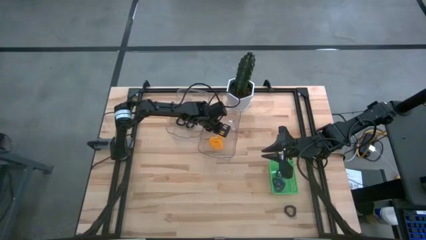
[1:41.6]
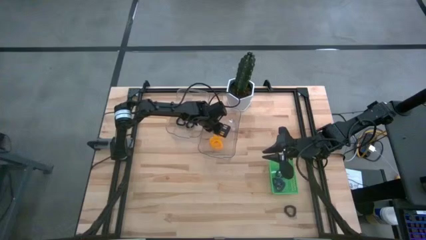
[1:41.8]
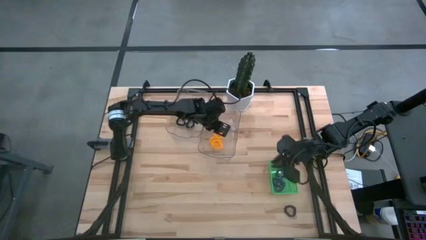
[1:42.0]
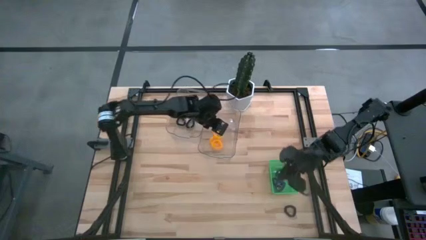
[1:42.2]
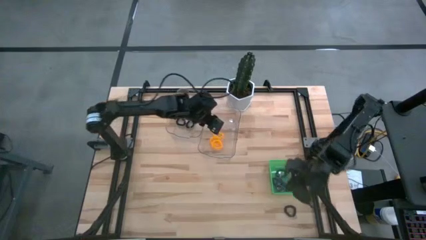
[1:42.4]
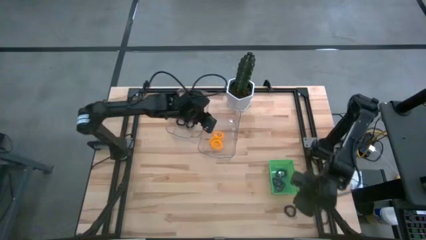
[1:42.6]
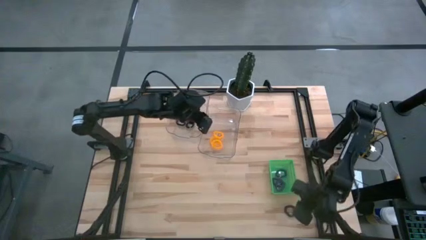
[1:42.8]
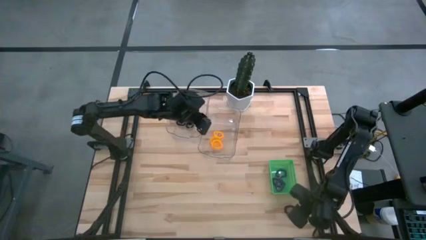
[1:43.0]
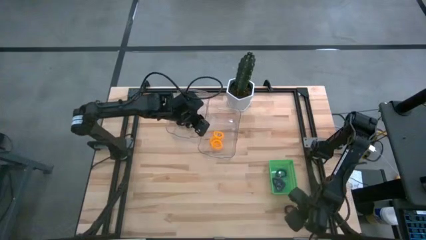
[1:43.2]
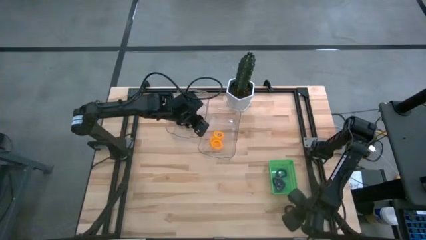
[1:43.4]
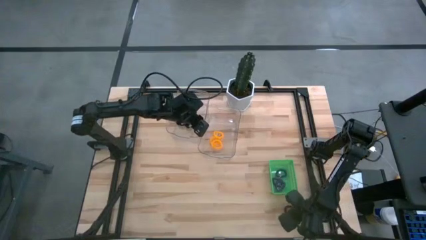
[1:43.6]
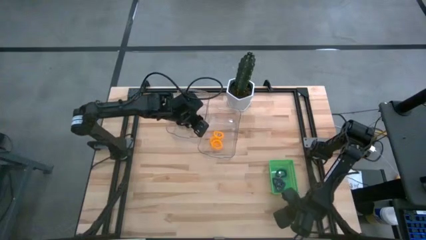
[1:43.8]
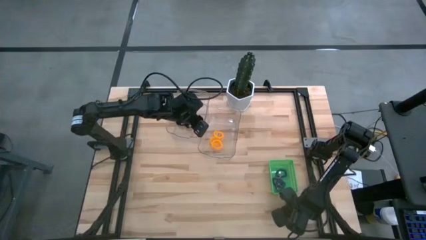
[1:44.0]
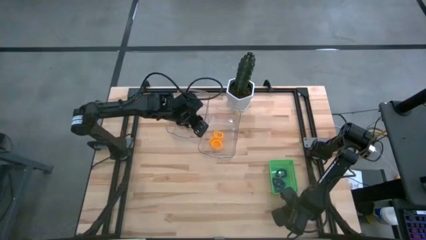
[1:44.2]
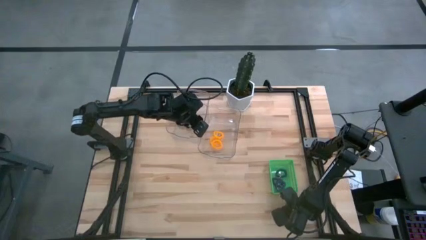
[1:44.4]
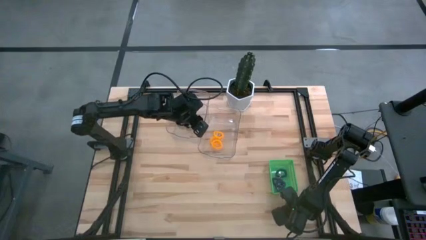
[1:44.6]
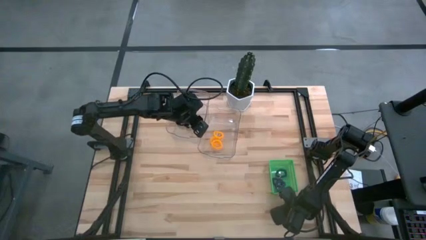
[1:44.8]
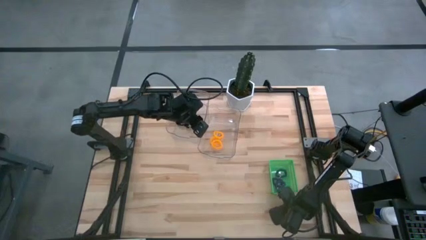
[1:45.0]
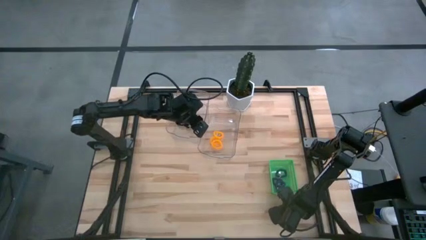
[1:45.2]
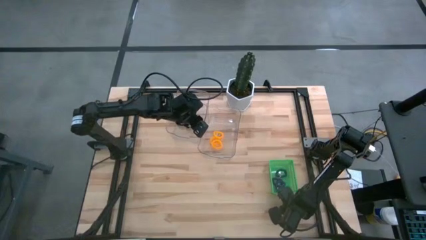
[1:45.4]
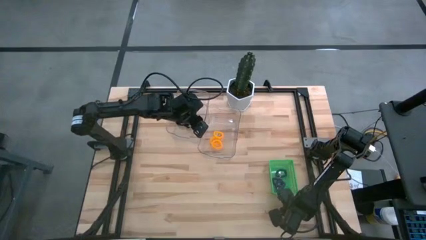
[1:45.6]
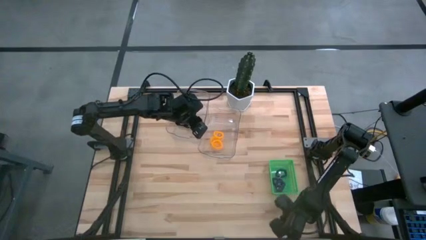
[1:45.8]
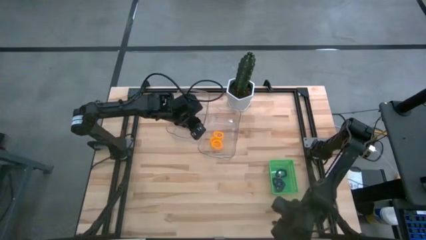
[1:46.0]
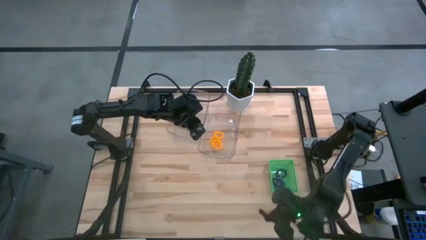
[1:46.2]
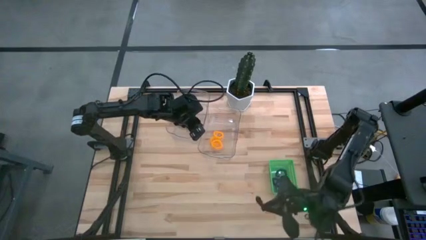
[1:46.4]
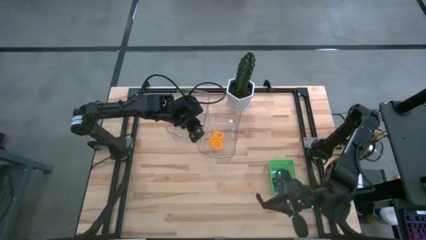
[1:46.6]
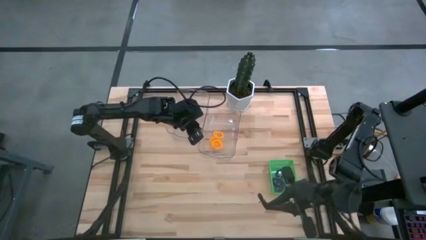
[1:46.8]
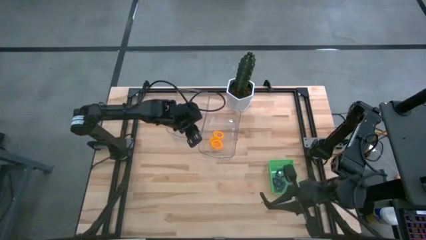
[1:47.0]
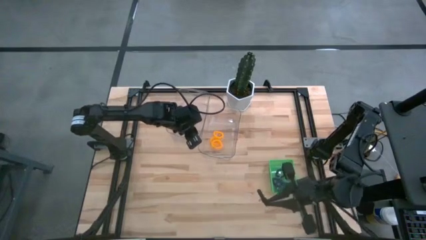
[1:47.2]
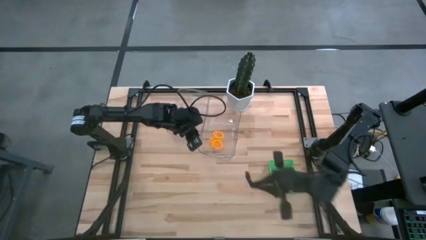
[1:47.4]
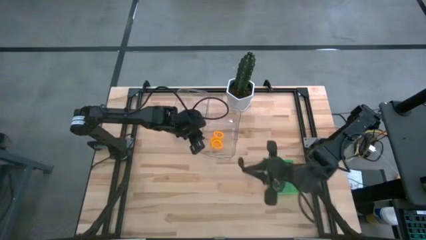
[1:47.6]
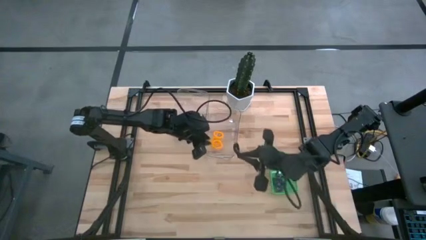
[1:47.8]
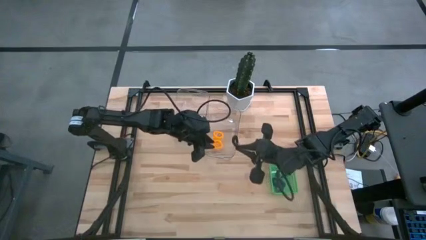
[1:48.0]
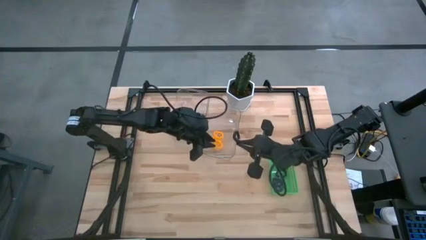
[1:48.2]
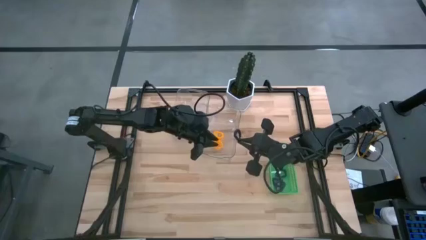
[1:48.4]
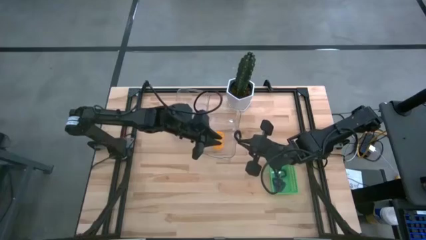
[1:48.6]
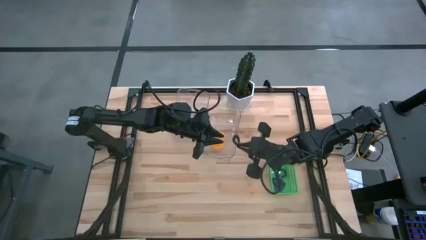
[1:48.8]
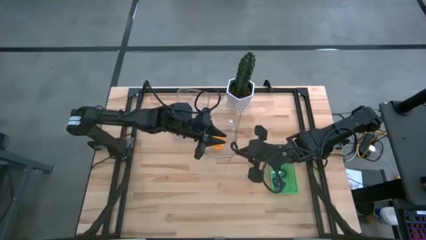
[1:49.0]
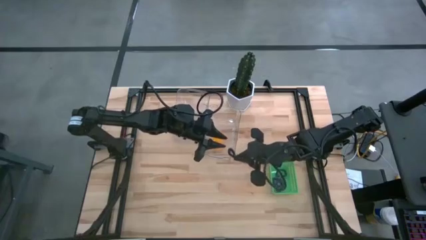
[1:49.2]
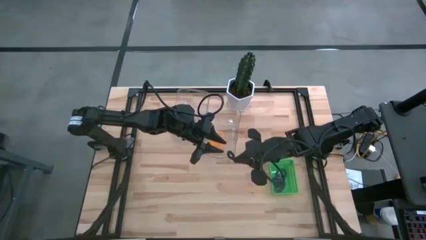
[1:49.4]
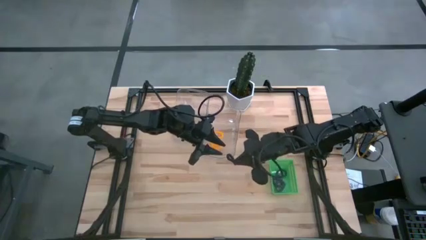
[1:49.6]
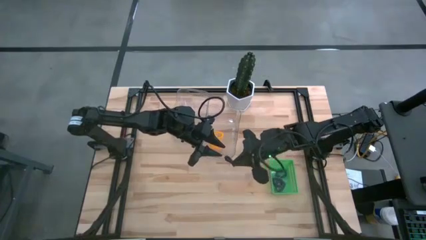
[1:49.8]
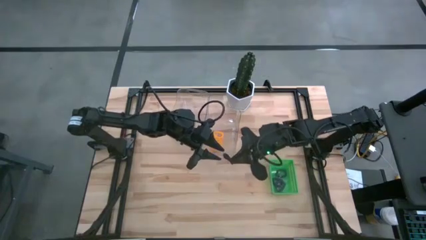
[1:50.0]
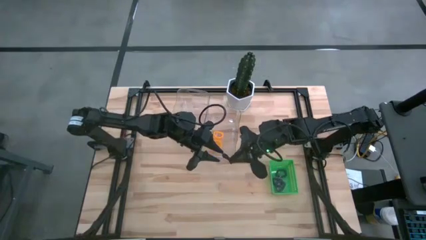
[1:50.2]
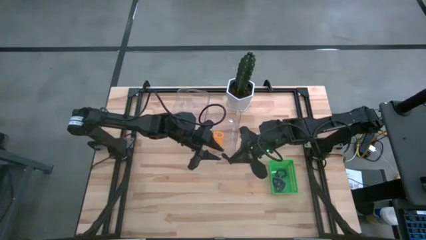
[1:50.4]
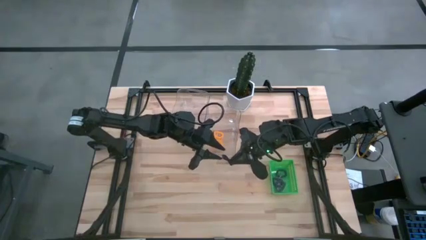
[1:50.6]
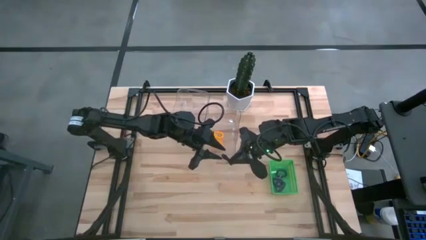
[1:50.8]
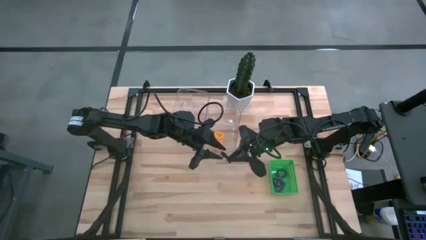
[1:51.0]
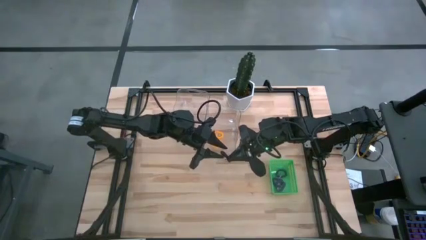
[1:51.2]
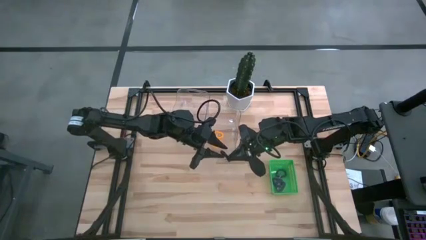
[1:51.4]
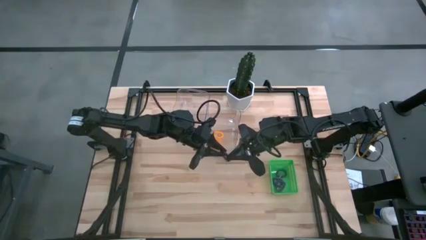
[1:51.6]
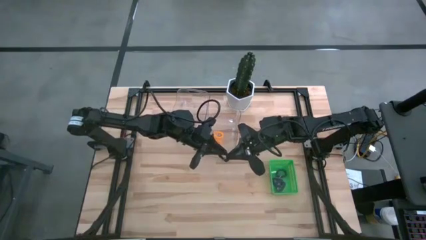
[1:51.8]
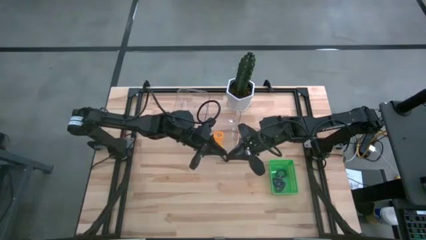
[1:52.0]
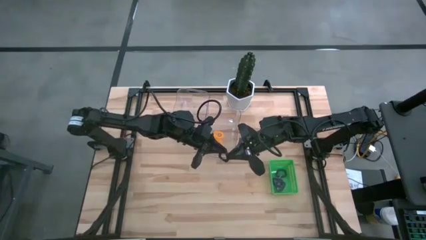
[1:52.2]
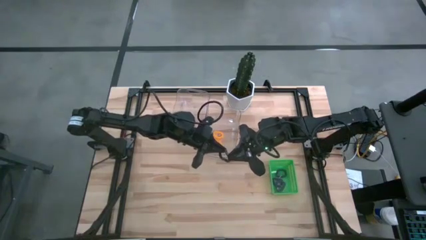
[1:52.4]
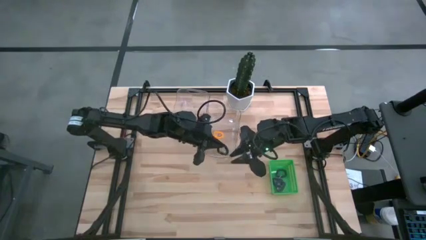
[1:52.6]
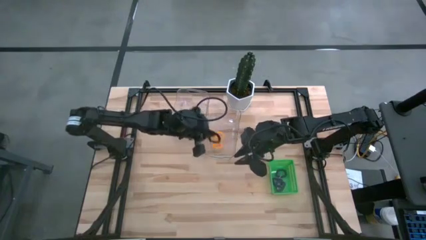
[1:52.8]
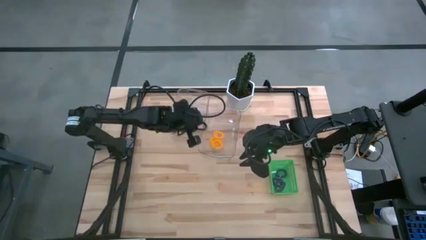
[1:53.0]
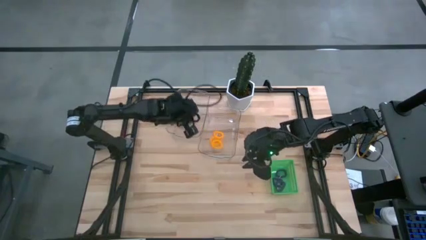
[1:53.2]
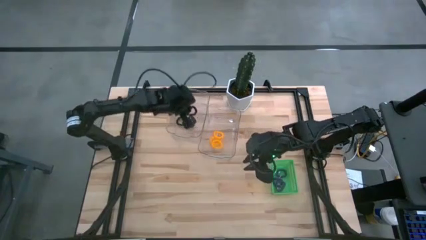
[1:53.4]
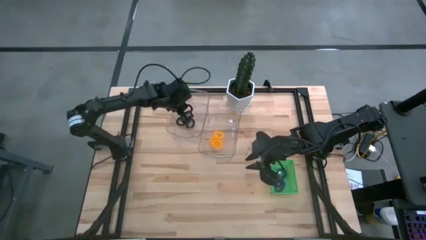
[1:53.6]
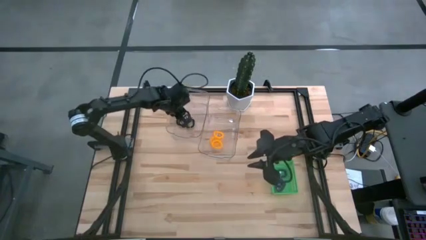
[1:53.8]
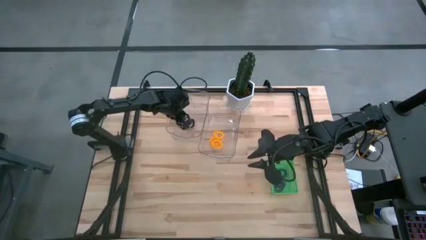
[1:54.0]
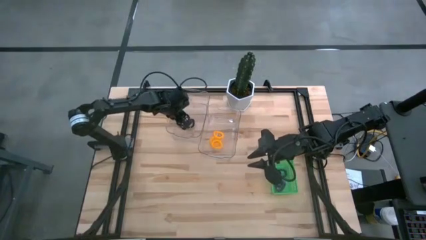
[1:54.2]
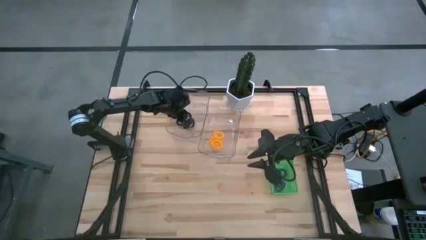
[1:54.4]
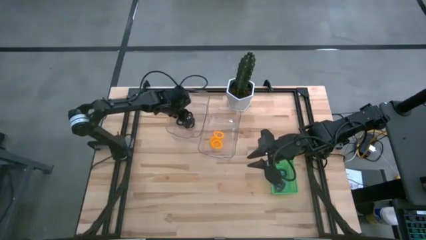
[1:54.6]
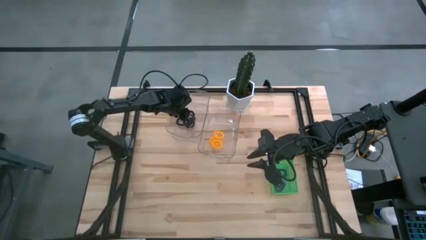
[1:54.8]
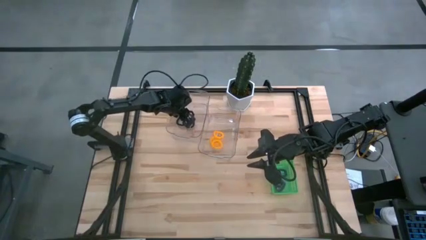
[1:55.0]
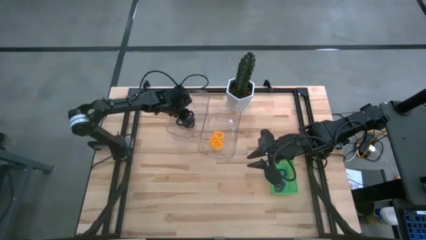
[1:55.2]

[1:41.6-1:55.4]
Task: Sort spring keychains
Put the black spring keychain into the left transparent bin
